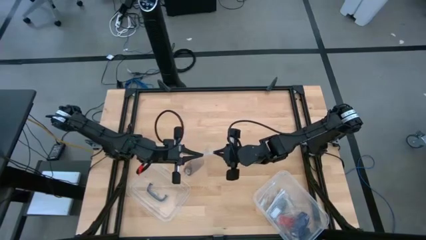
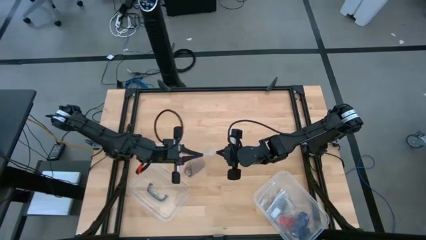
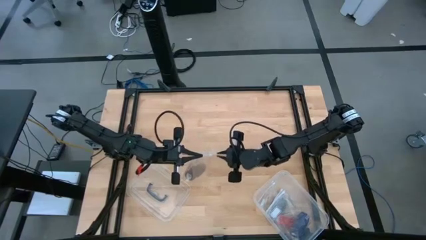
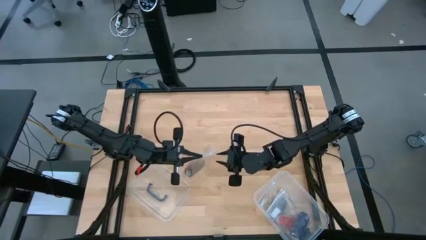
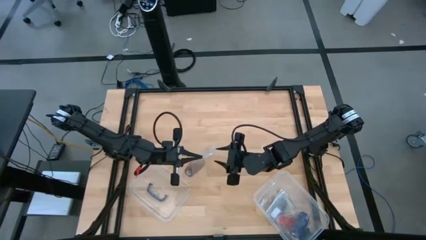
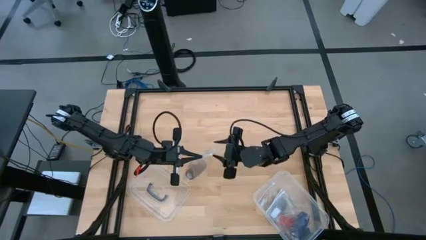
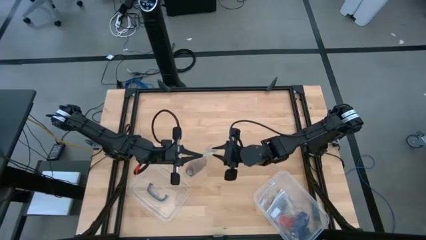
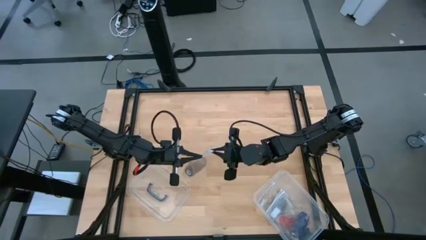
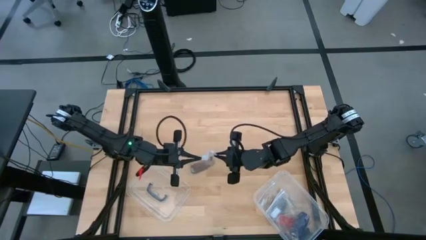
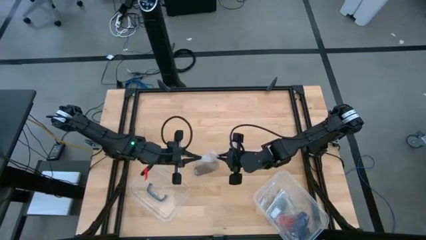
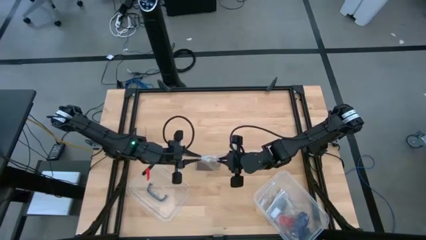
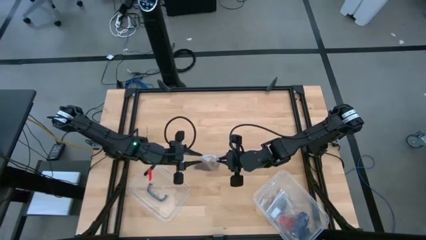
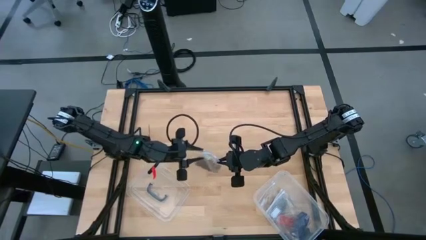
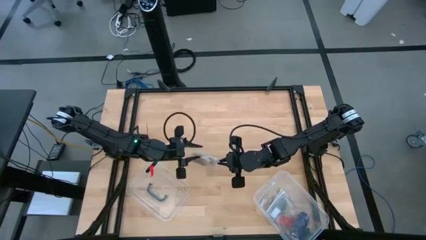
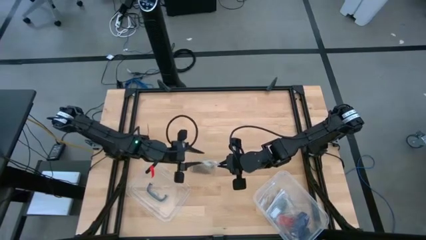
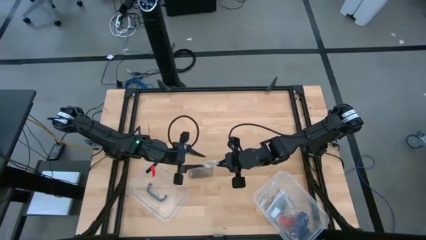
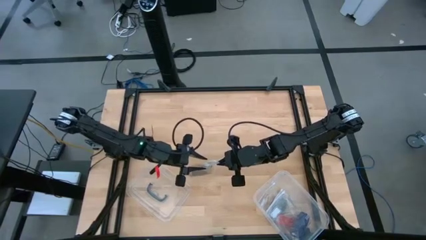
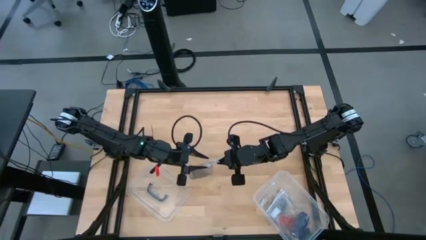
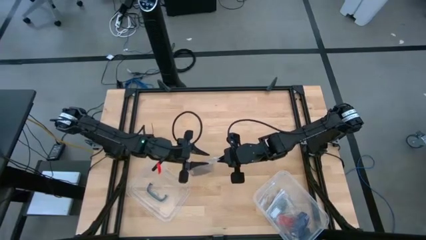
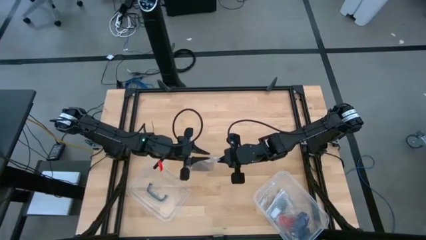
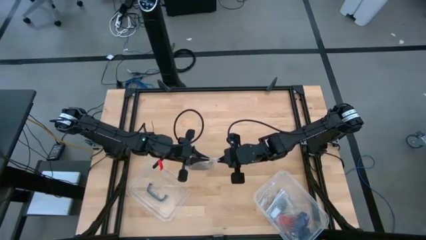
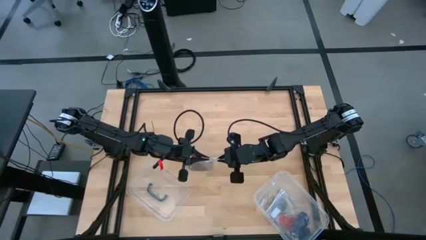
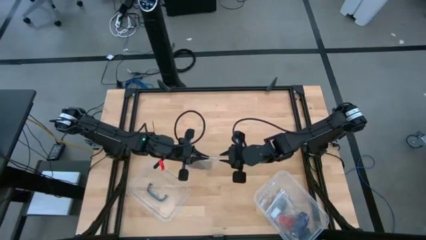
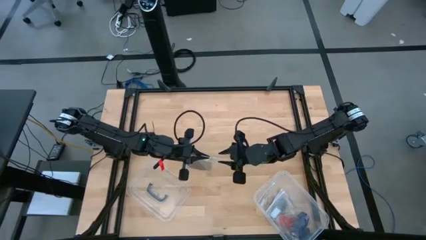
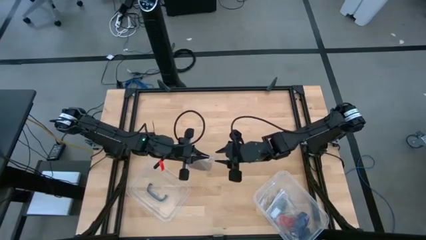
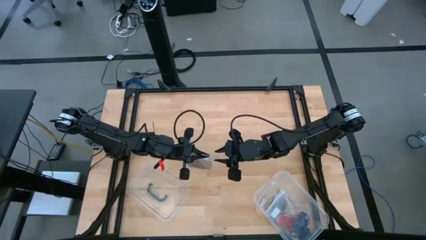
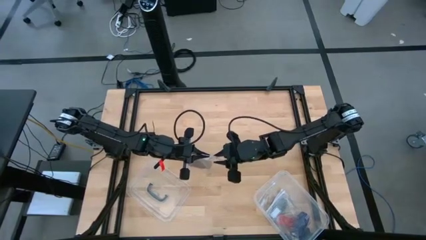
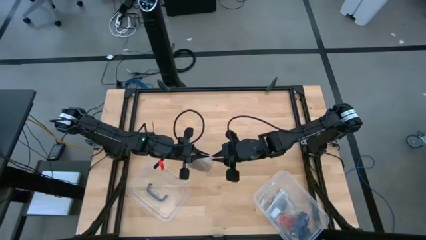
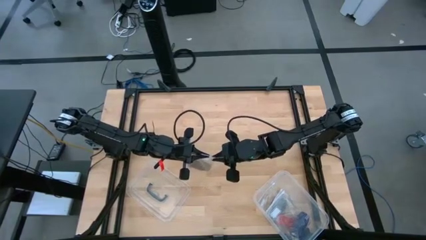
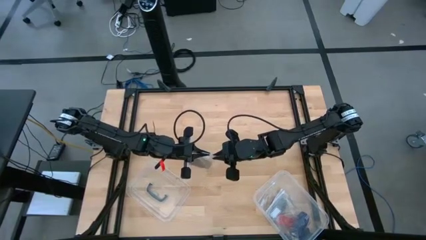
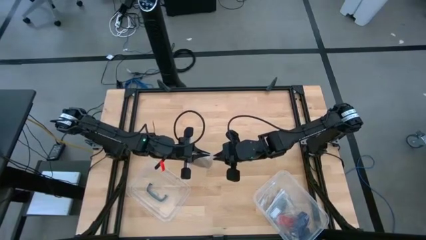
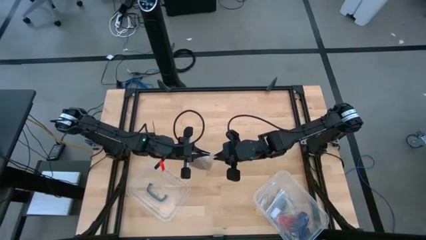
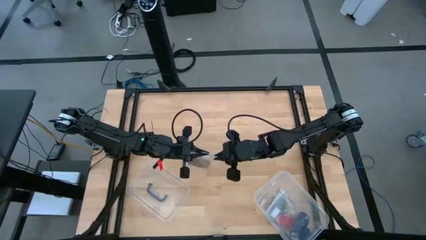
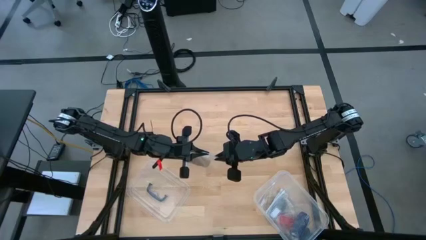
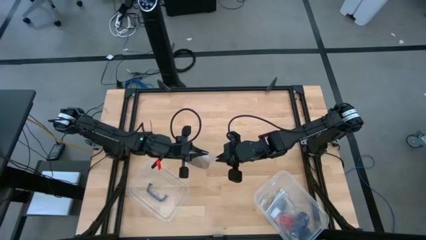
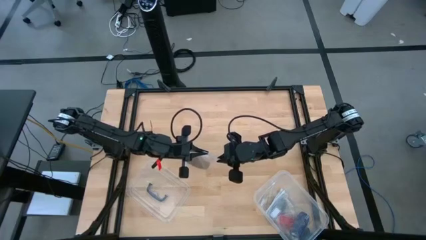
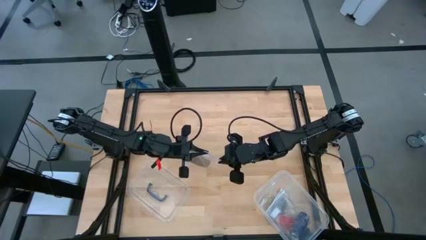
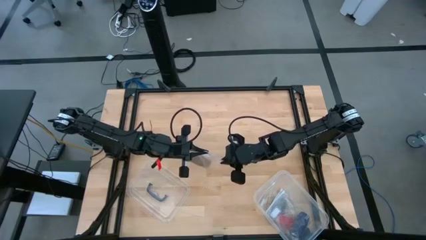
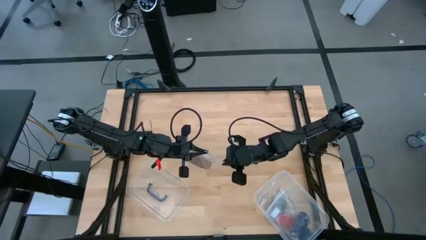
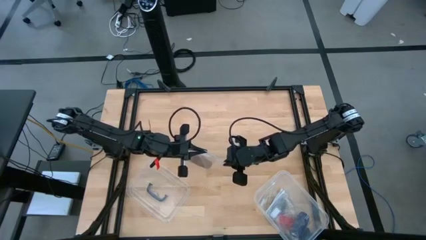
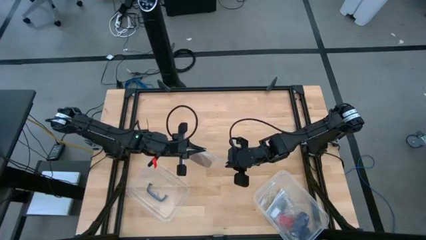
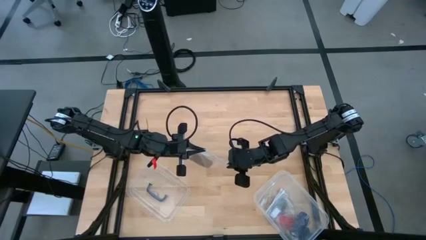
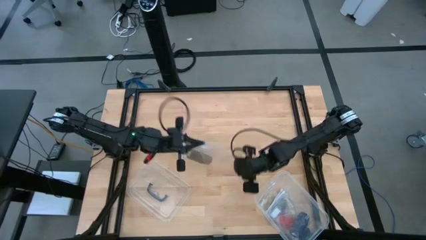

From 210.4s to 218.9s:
Task: Roll bandage
Close the transparent zip bag

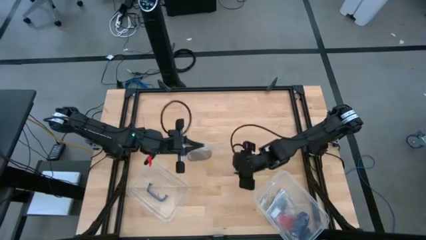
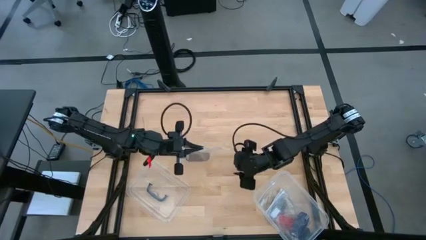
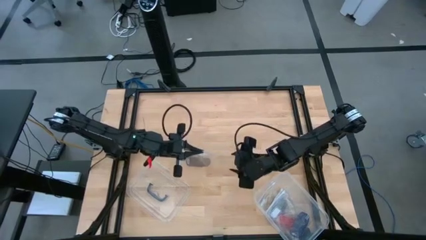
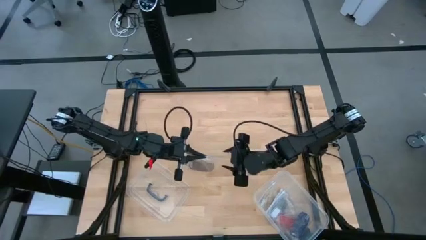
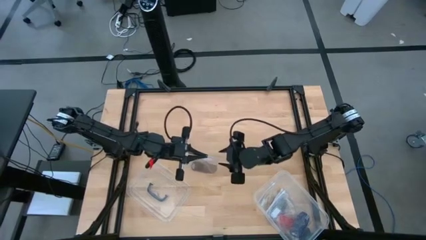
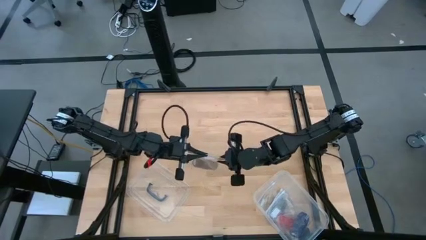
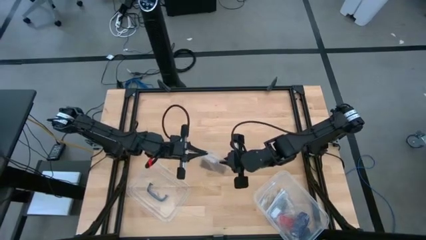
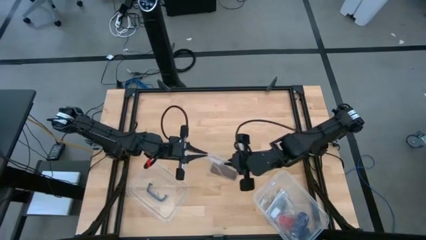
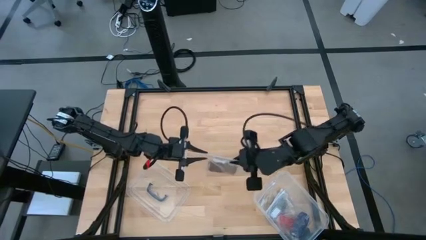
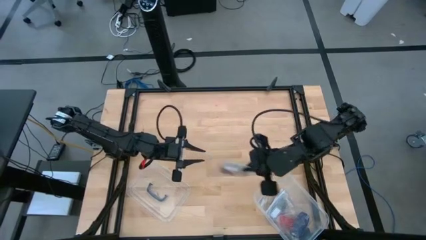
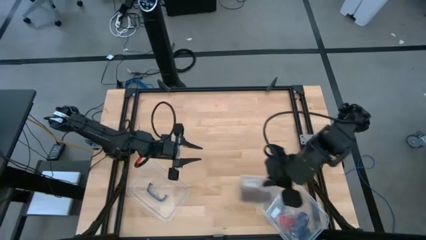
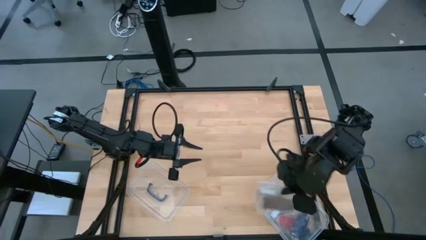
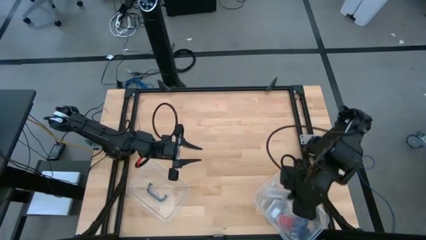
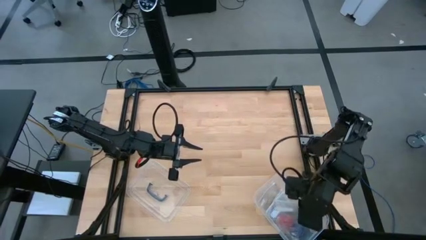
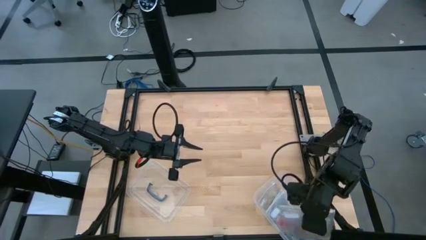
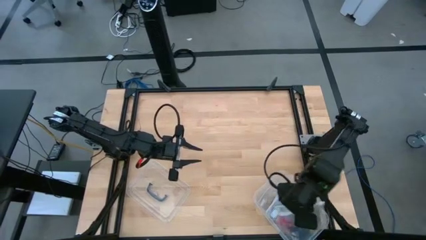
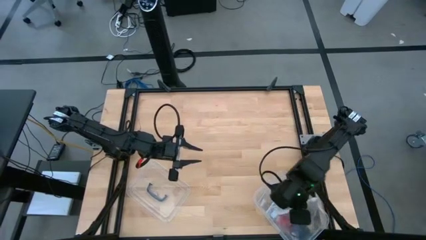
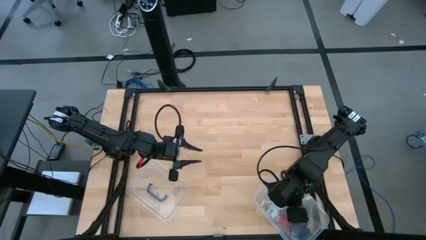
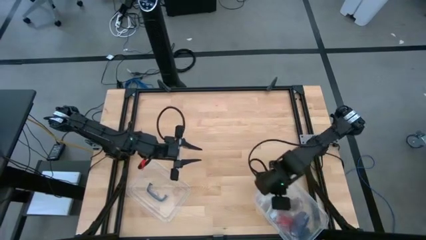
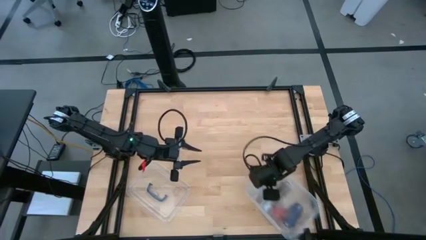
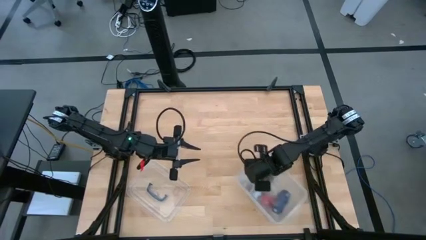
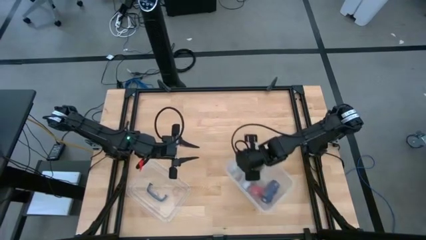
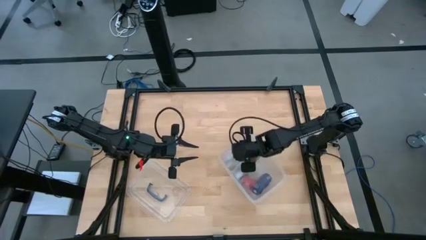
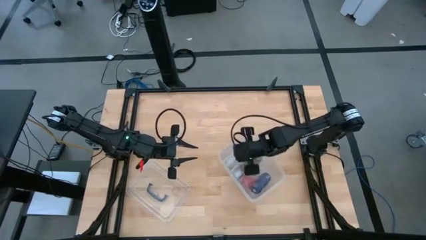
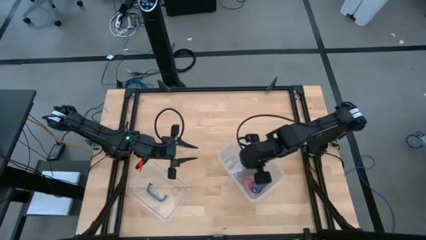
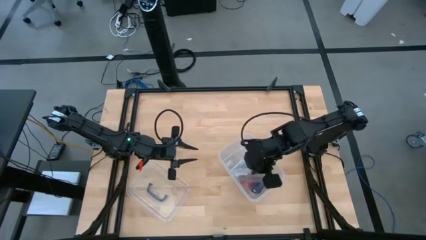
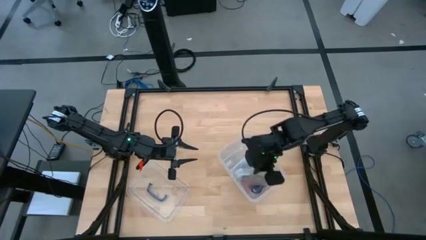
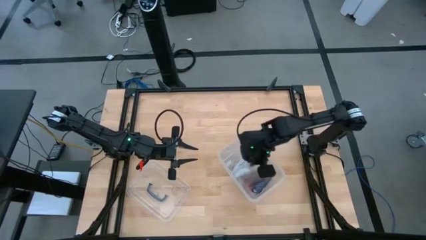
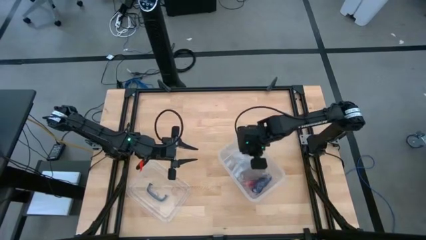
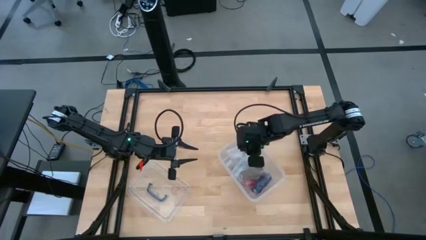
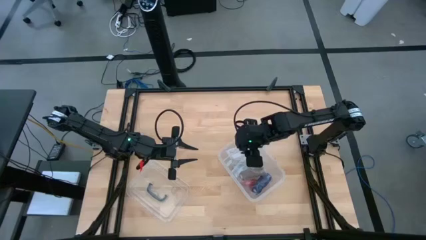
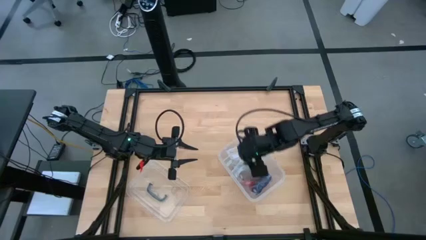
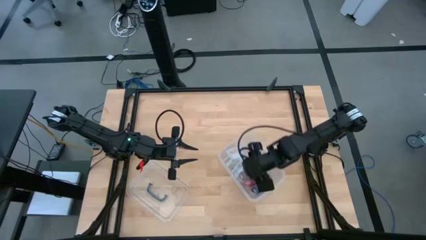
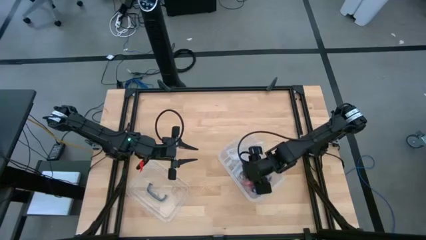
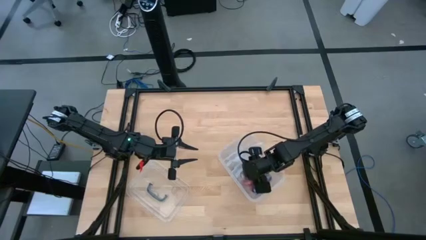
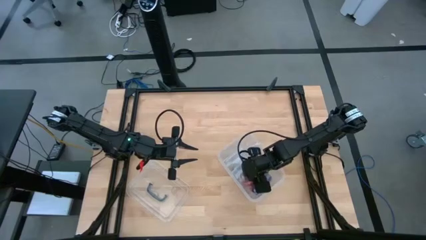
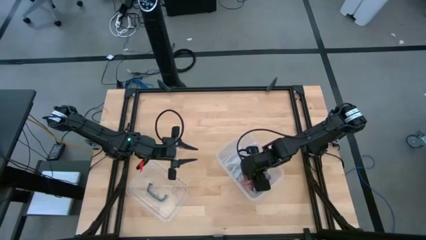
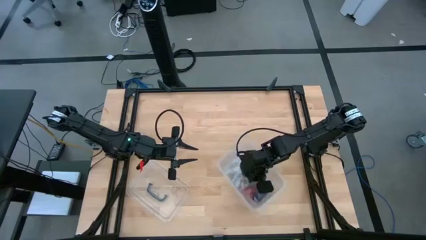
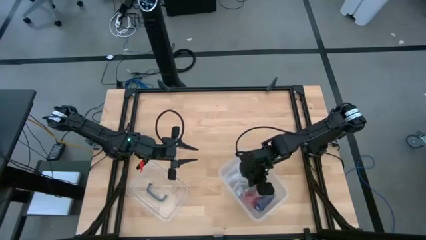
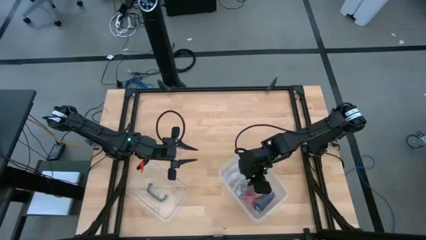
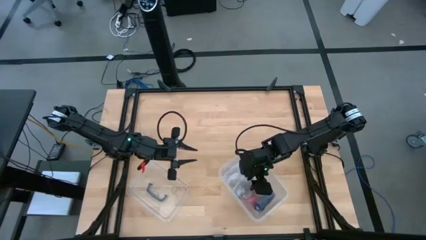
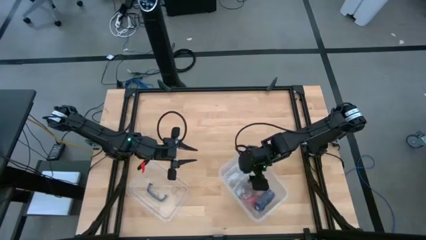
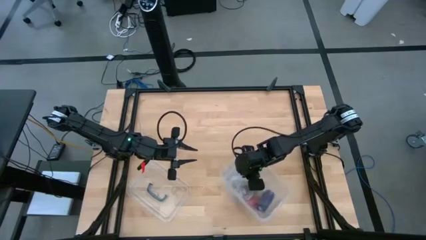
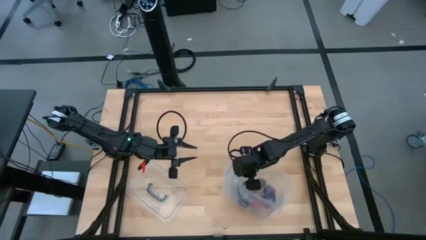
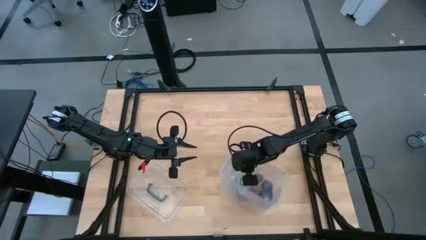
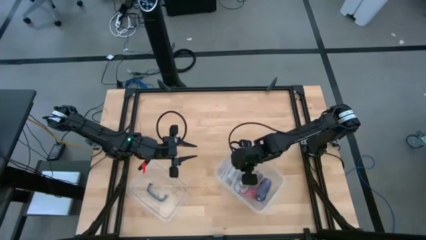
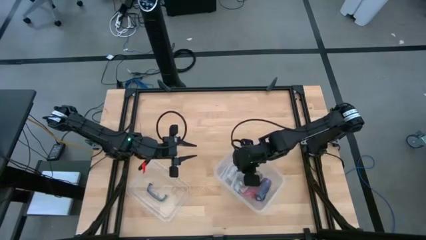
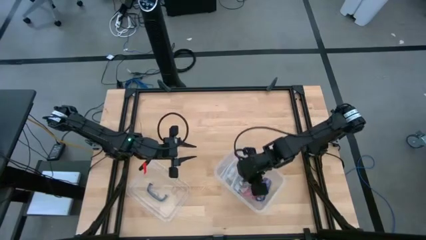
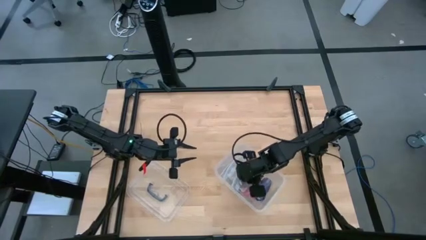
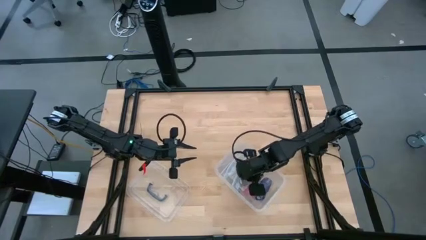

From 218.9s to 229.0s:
Put the packed rolled bandage into the transparent bin
